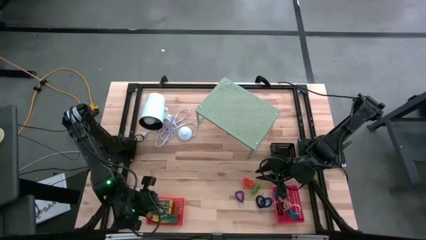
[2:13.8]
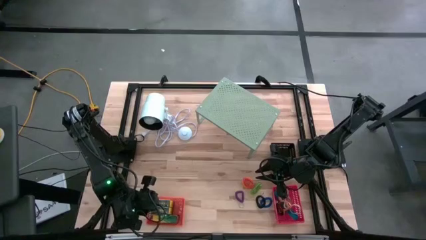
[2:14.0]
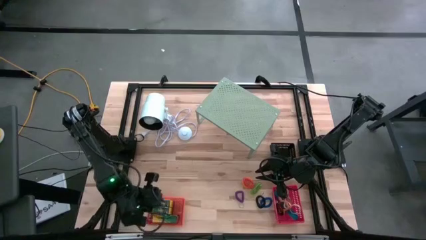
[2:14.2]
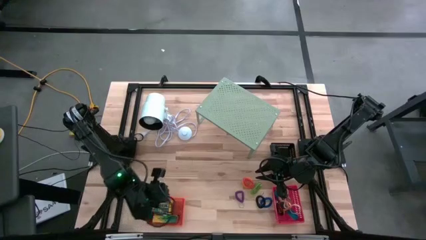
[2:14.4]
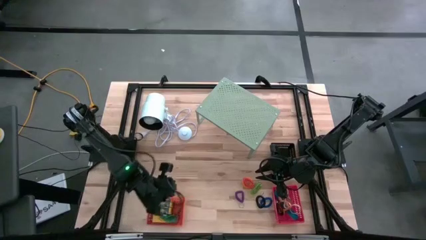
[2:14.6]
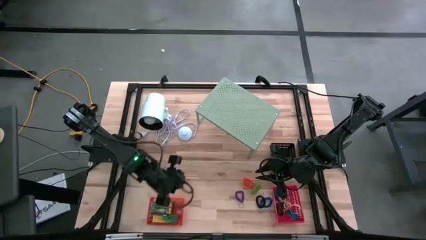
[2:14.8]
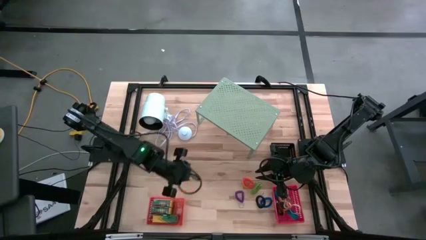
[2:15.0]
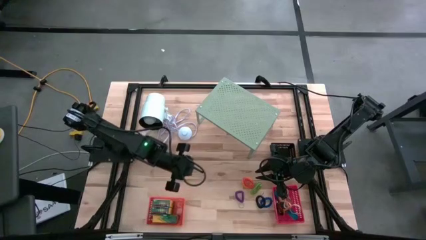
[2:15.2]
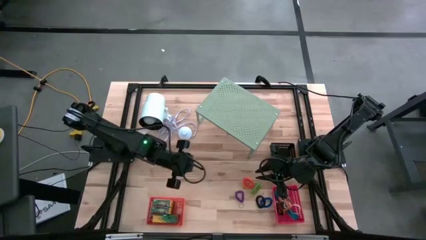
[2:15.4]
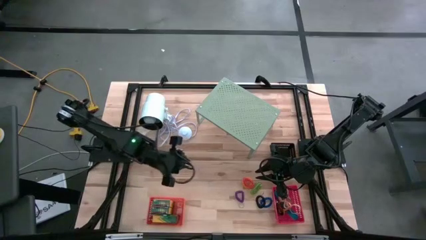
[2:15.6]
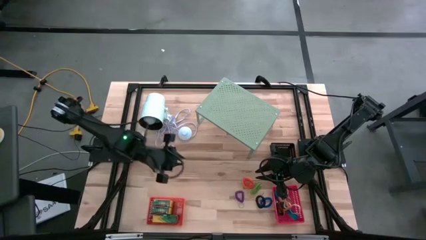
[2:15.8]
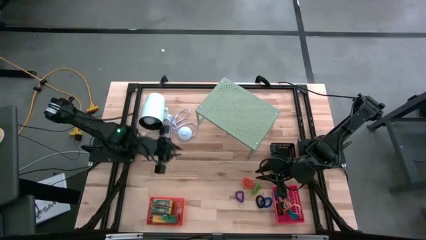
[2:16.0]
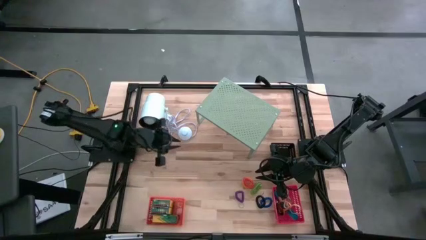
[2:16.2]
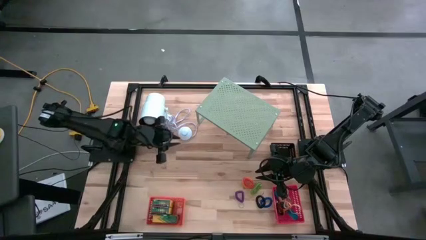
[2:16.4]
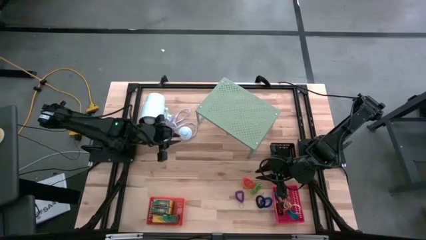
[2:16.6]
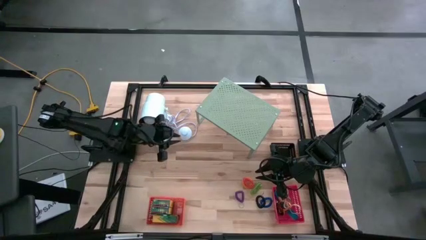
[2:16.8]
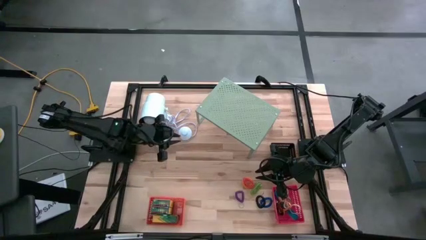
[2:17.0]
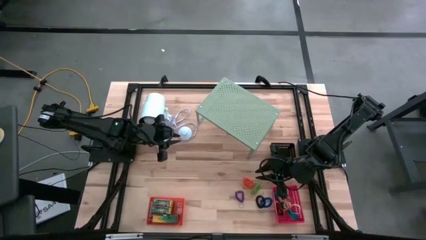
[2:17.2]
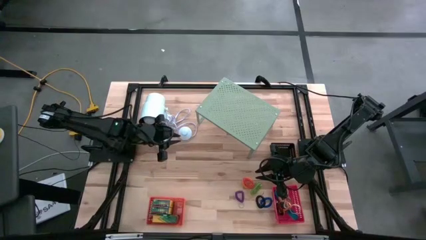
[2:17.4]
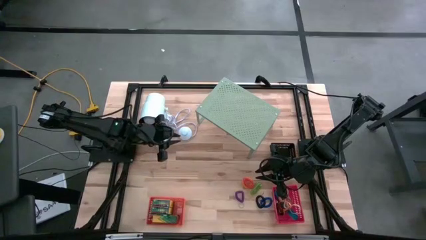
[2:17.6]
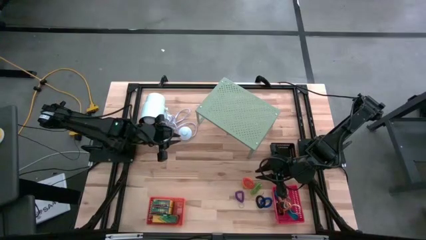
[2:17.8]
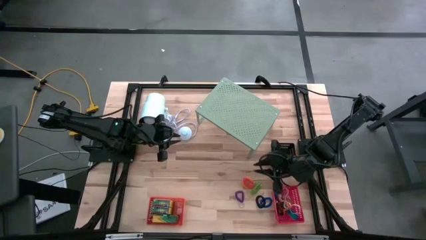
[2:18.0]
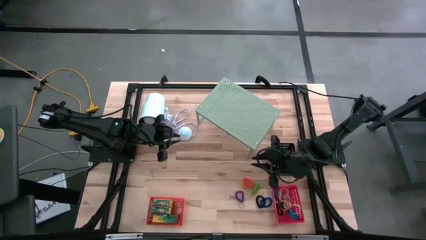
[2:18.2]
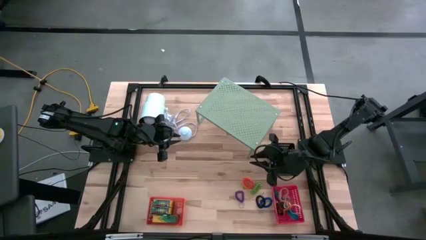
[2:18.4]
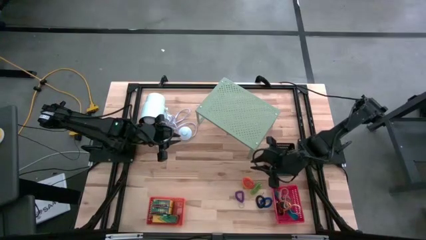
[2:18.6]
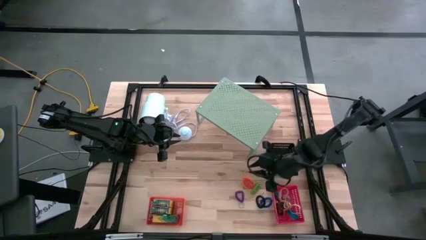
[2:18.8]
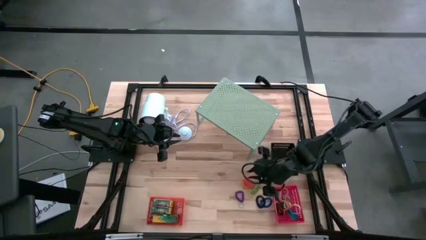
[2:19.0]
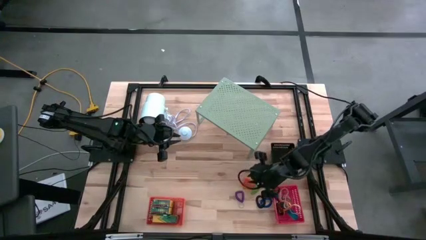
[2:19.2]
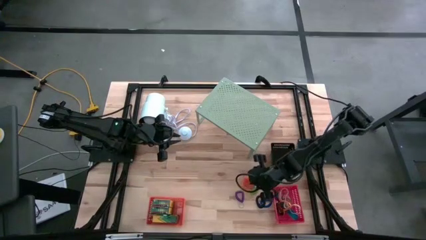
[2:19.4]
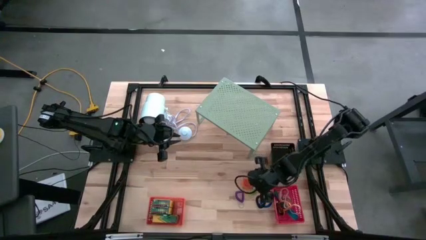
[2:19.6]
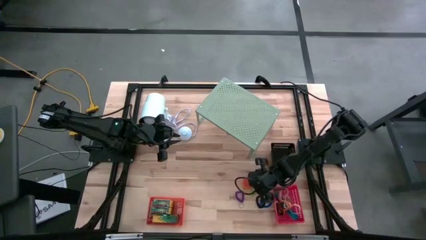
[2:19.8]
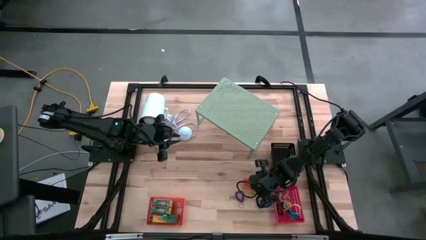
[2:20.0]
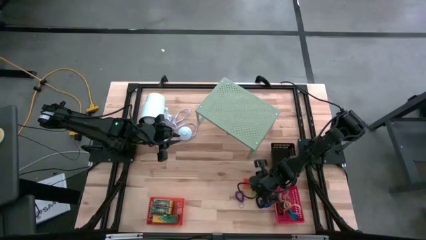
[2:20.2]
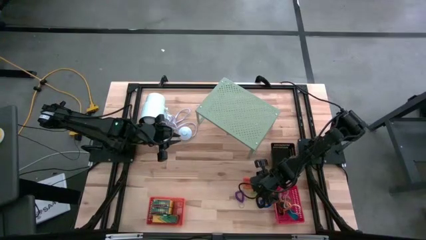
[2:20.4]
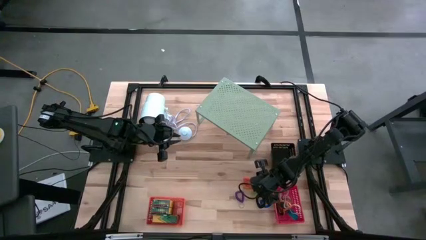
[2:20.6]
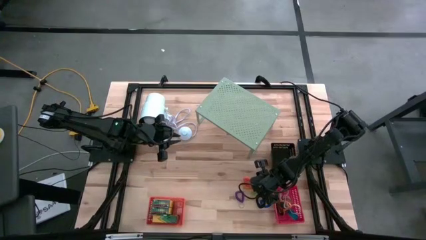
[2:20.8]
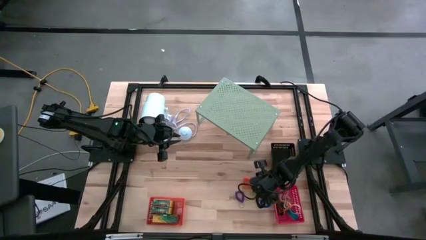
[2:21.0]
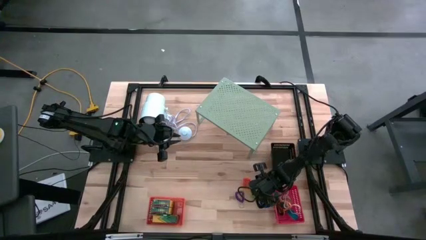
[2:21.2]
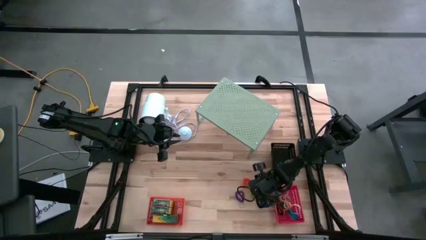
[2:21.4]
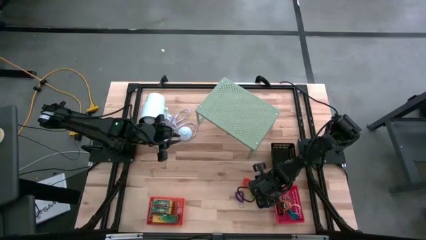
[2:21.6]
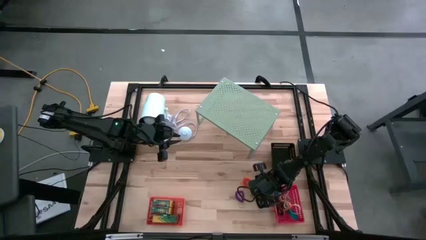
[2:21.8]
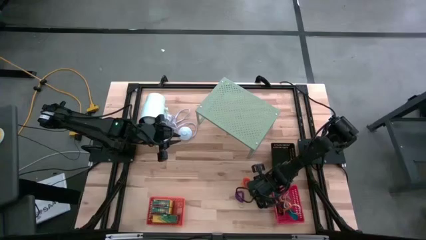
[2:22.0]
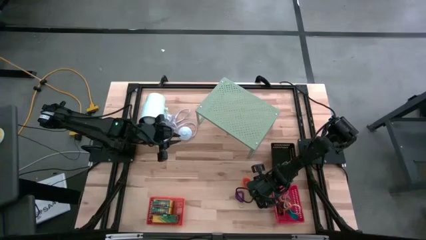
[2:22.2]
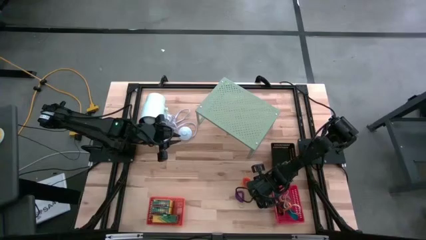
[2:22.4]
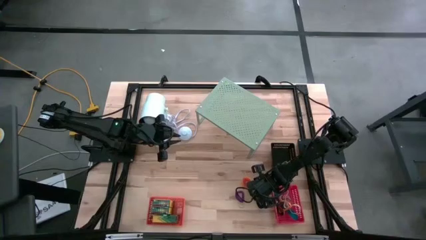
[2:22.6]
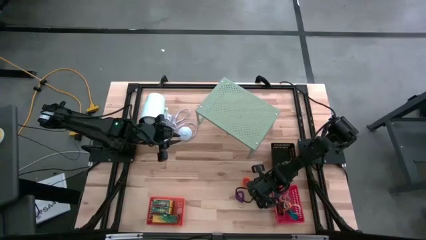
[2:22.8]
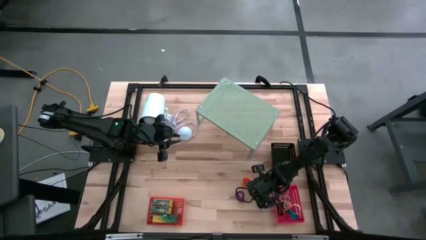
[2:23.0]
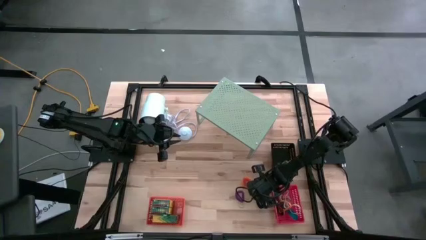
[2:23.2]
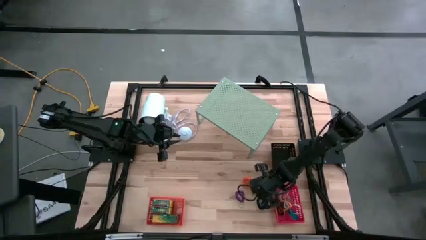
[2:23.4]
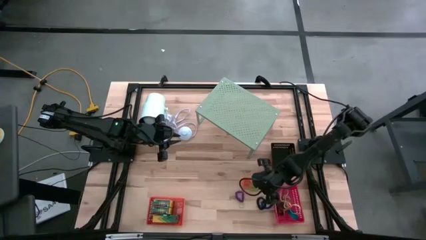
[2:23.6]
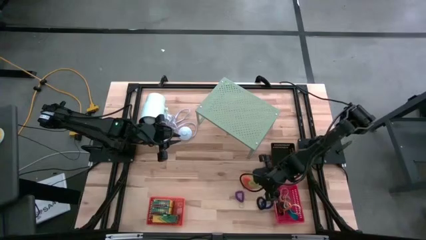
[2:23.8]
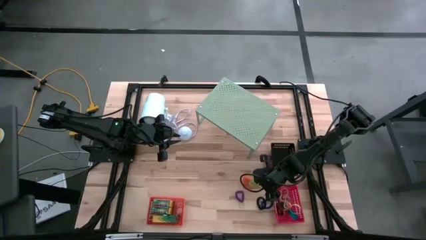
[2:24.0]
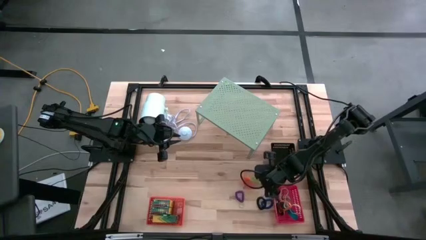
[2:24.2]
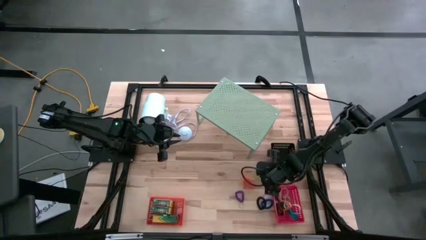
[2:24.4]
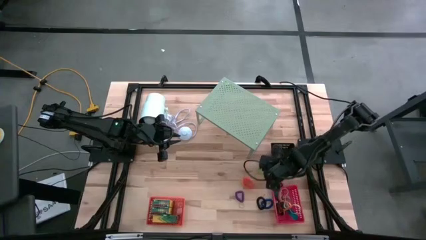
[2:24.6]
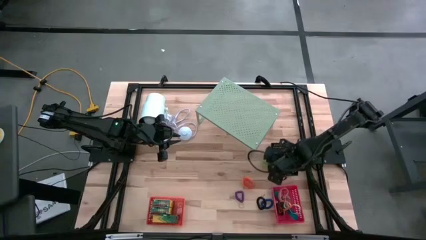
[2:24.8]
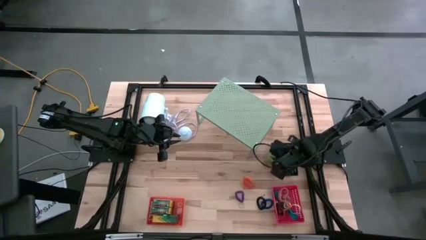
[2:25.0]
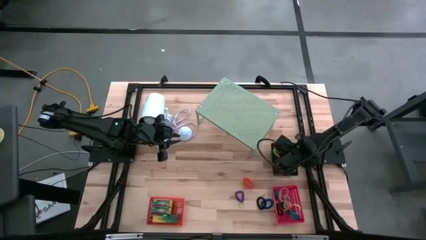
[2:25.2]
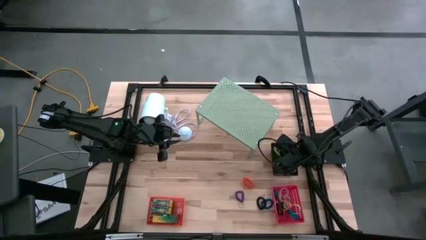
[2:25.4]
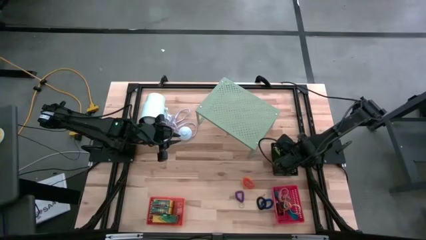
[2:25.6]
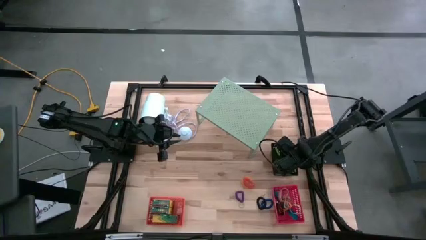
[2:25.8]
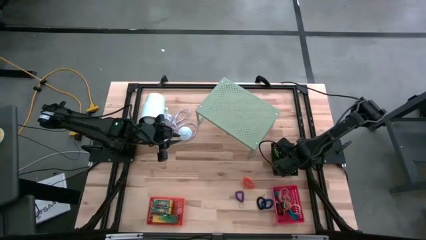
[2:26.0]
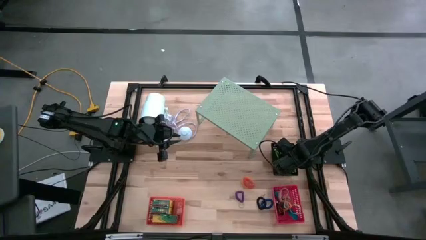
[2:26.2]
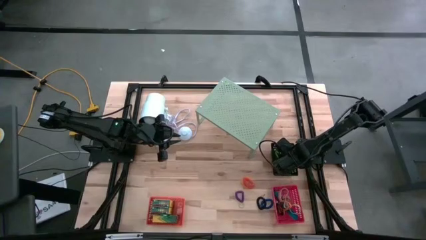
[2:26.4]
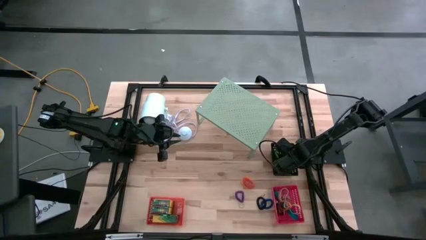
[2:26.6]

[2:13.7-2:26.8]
Task: Pick & Place Office Desk Supplies
Put the green spring keychain into the black bin
